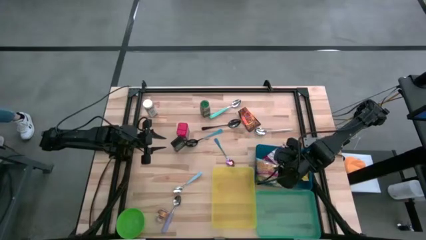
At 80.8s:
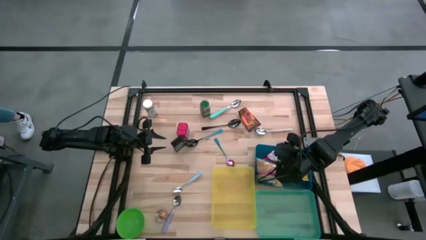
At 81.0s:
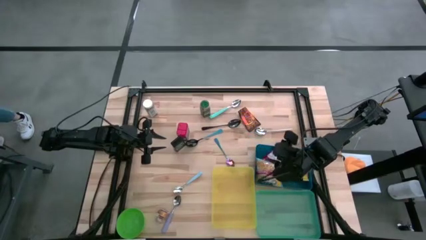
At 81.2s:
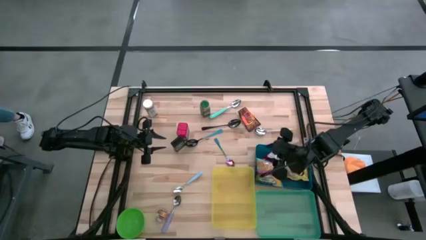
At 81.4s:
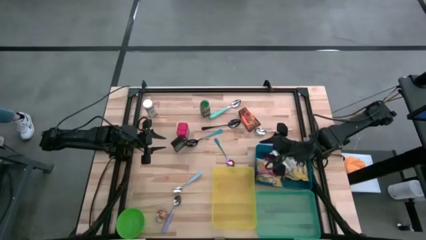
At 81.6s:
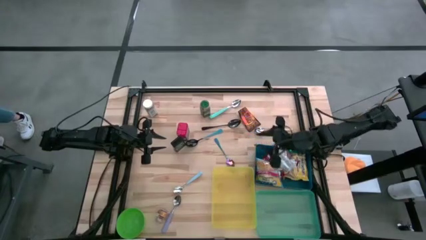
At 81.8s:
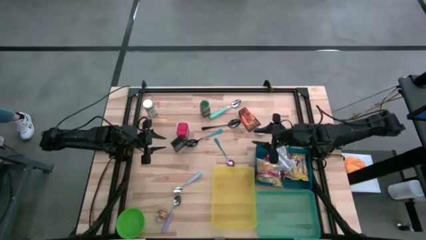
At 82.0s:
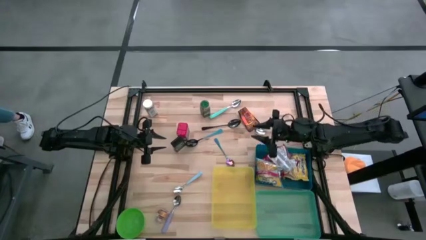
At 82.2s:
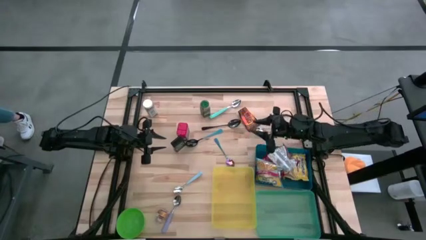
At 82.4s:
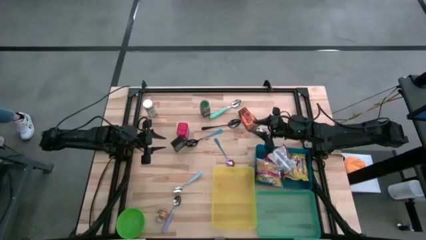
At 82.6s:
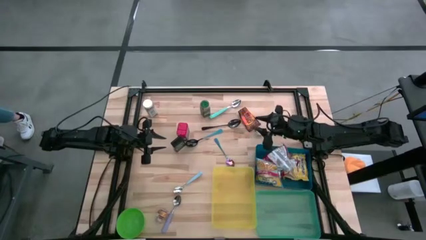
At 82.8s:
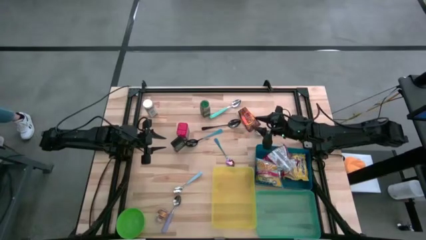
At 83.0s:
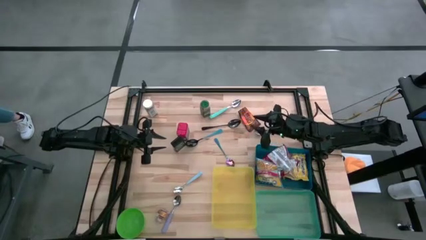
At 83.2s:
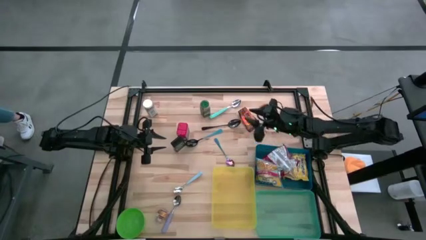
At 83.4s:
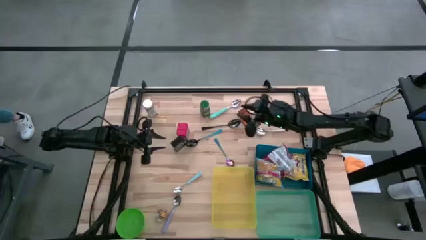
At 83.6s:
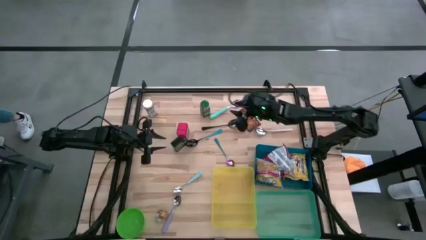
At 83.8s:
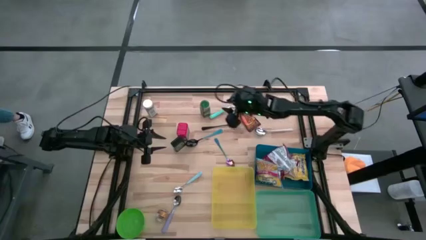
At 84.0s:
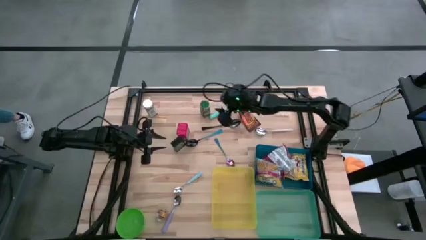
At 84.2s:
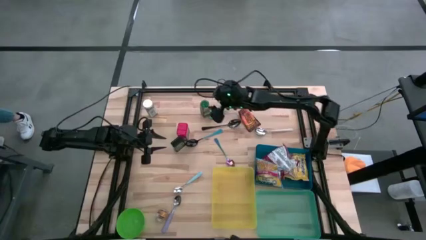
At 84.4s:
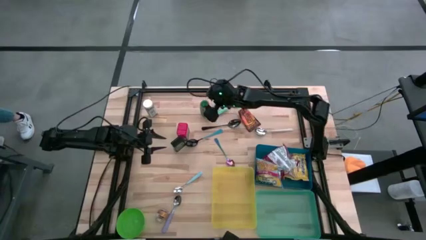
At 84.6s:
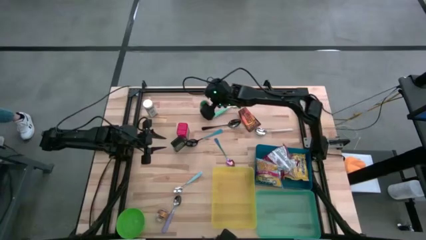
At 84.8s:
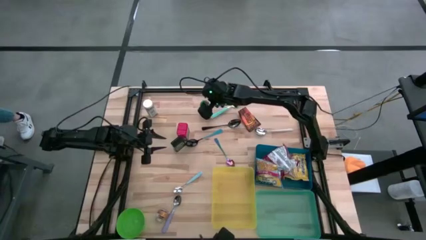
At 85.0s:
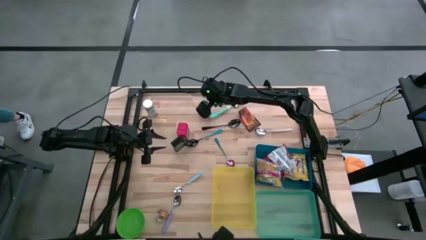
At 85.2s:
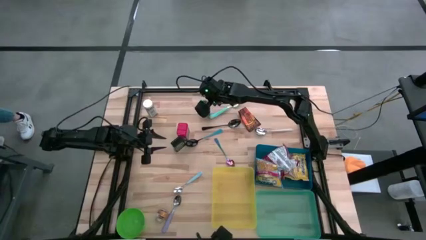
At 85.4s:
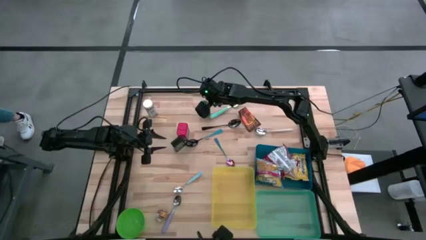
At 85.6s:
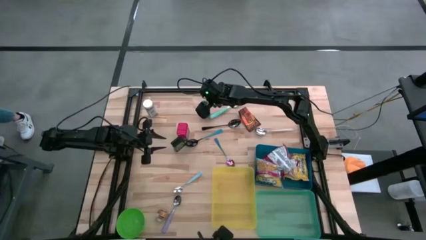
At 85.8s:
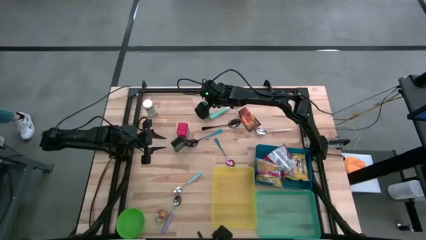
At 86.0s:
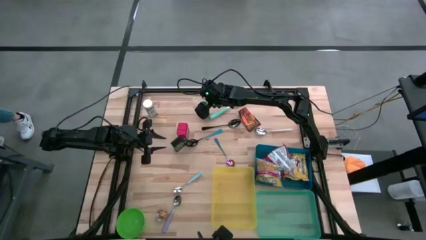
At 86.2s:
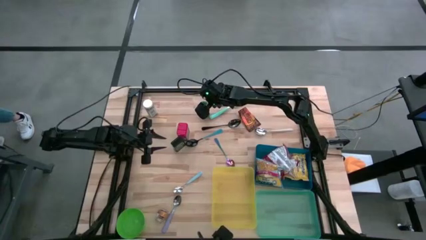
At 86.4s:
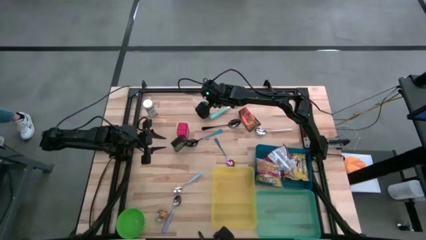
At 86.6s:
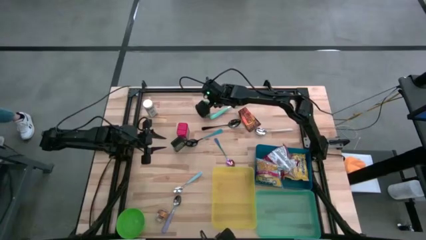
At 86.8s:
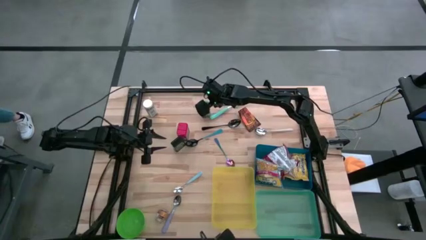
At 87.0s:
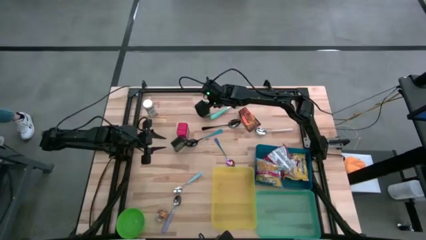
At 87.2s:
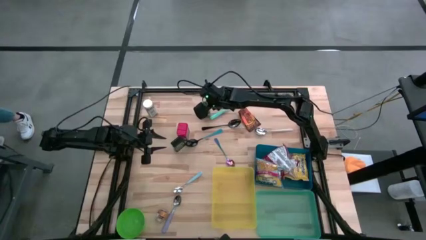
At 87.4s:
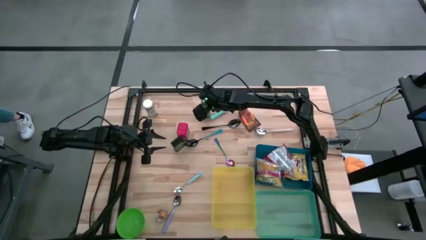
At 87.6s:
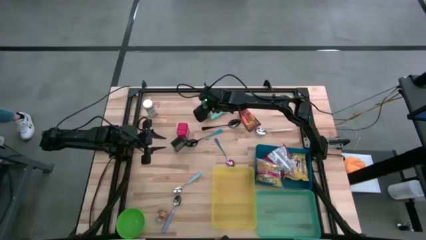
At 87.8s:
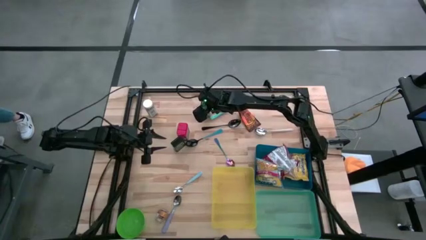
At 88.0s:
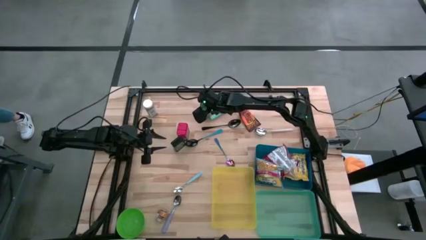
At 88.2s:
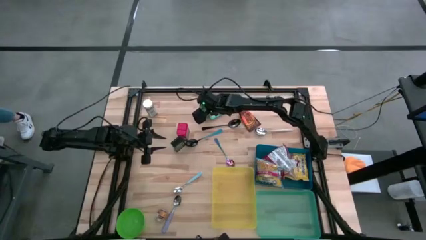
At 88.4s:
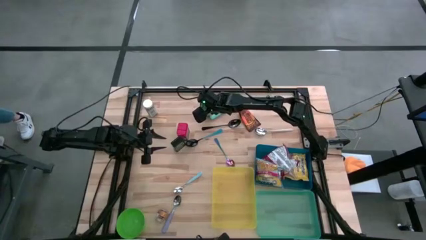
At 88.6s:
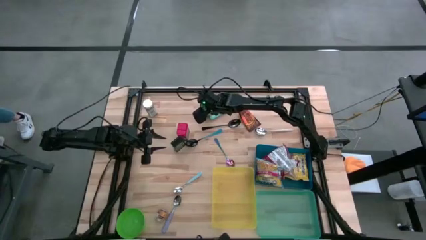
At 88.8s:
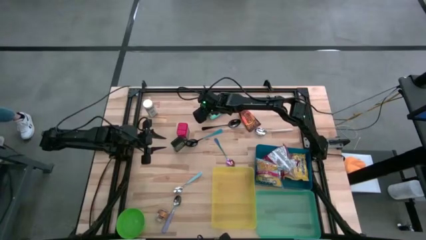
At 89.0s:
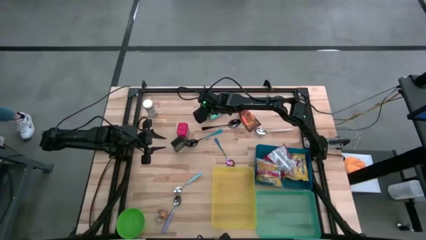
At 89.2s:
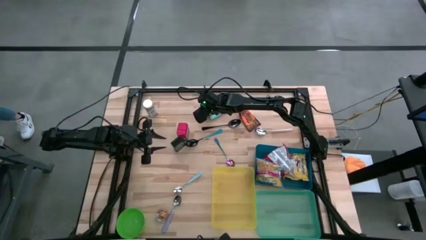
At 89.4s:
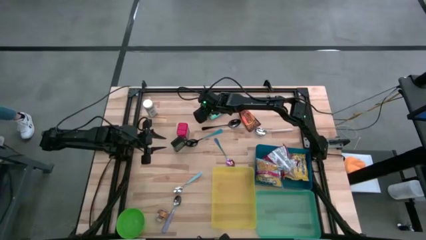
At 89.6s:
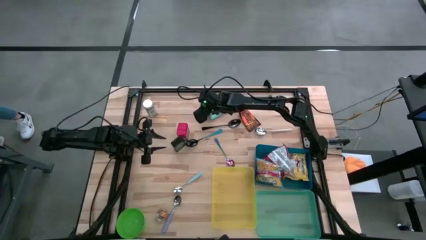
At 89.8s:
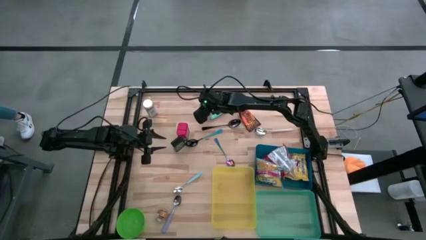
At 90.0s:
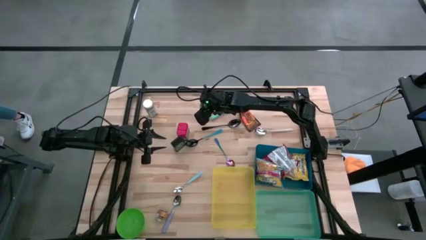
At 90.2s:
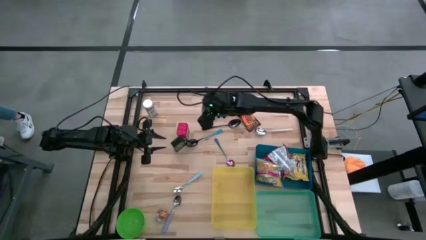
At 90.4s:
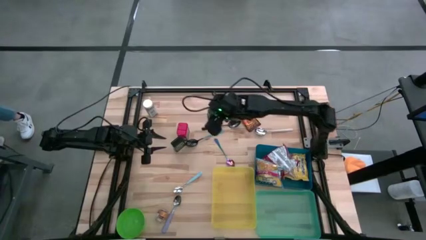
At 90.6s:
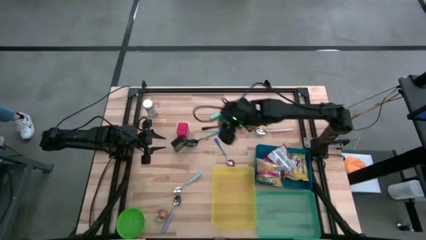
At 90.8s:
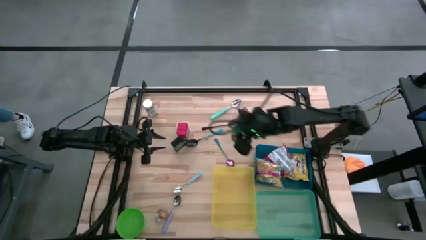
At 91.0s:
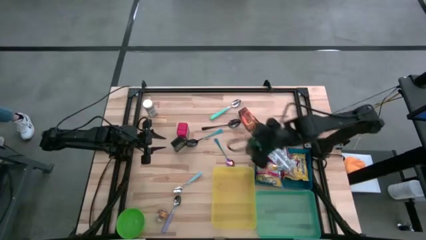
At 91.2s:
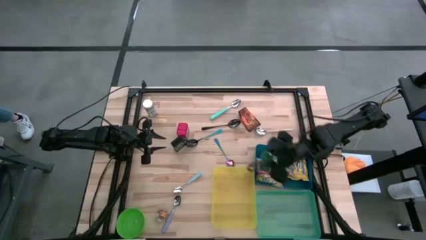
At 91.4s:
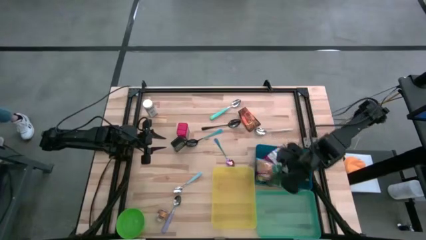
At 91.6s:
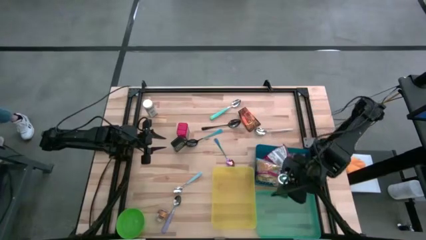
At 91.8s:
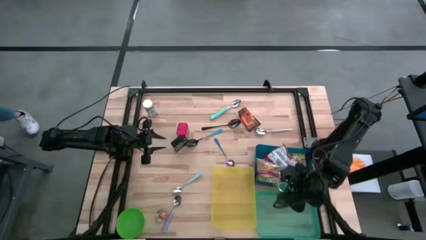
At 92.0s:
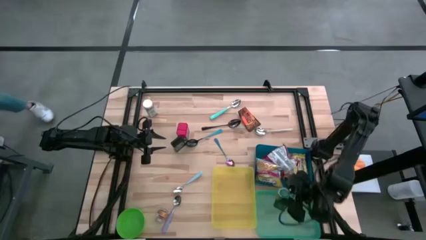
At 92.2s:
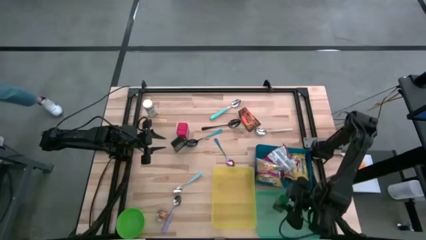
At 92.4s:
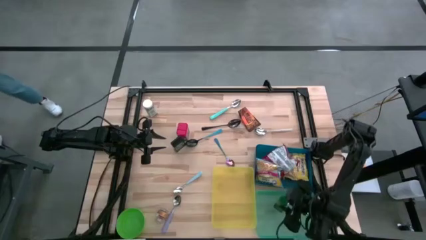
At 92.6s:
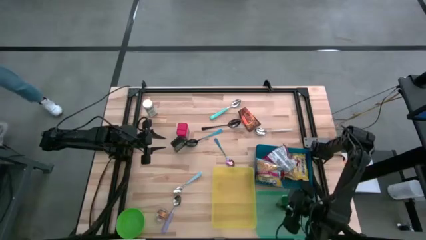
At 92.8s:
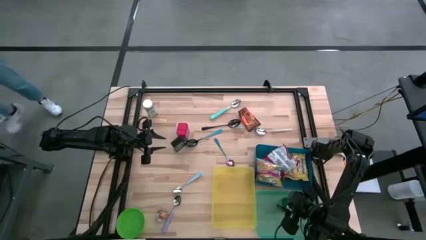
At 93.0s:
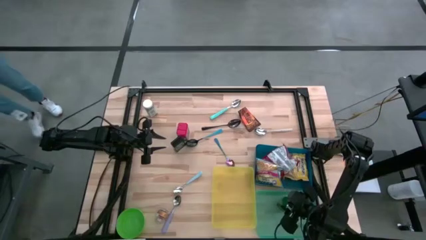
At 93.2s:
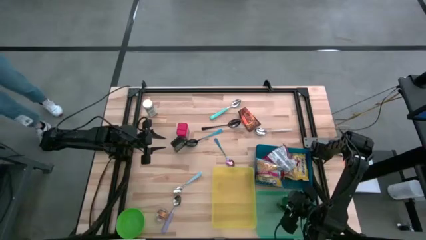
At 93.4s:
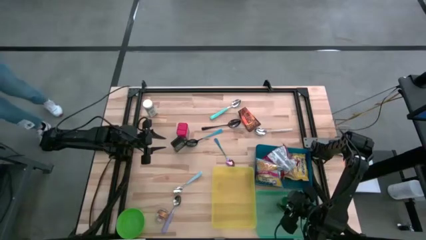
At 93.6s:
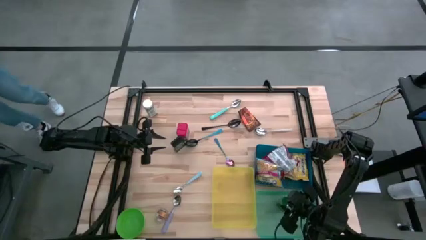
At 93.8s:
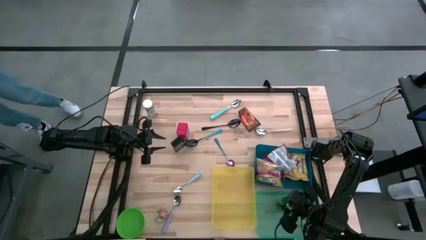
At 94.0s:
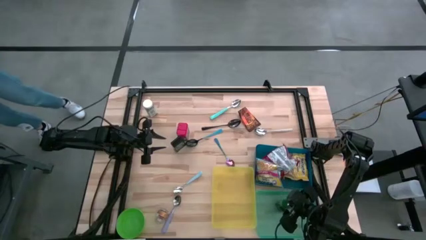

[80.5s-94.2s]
Put the green seasoning jar into the green bin

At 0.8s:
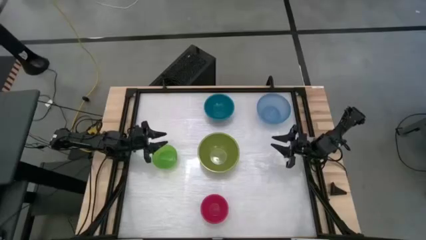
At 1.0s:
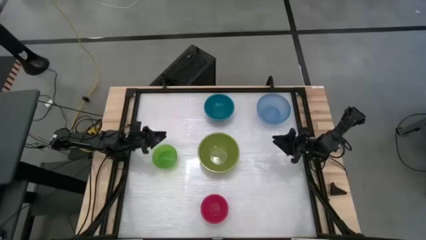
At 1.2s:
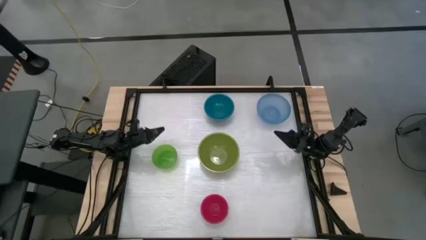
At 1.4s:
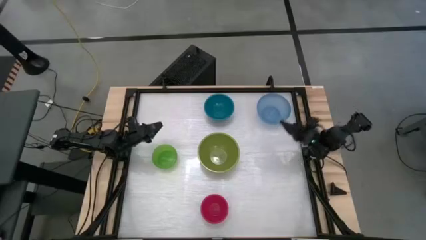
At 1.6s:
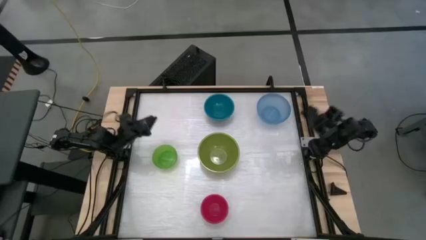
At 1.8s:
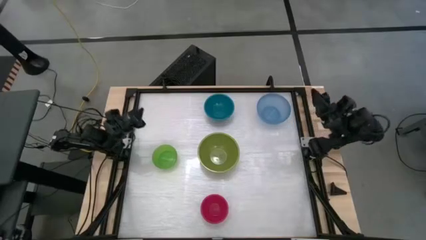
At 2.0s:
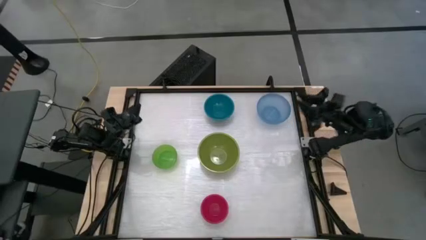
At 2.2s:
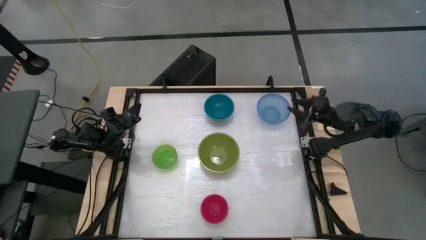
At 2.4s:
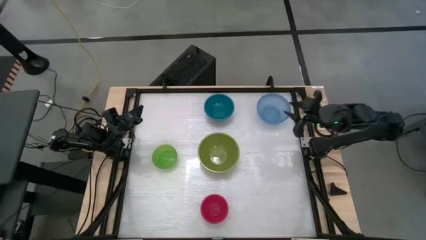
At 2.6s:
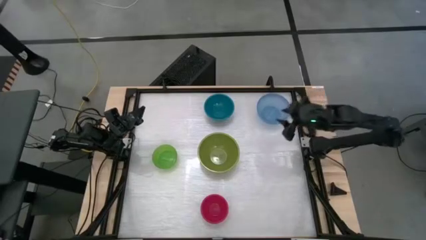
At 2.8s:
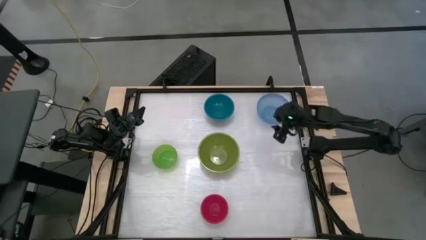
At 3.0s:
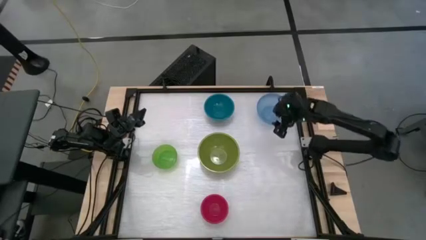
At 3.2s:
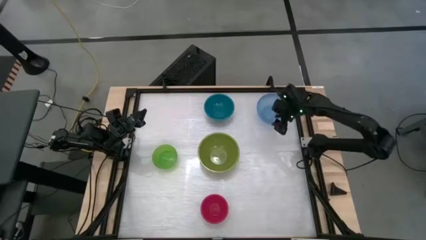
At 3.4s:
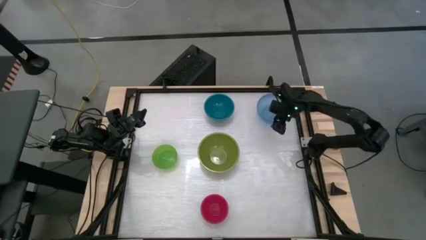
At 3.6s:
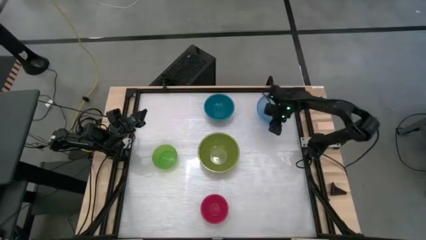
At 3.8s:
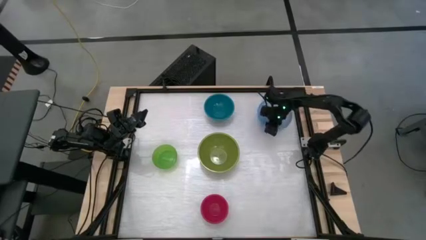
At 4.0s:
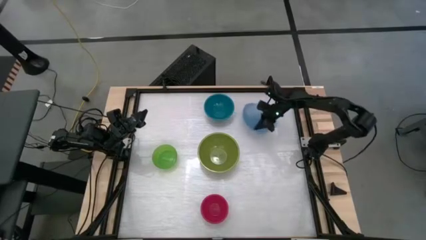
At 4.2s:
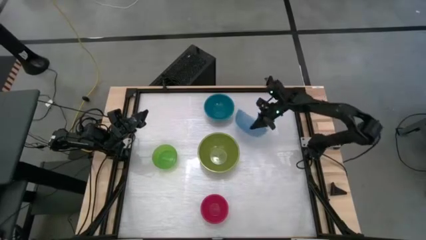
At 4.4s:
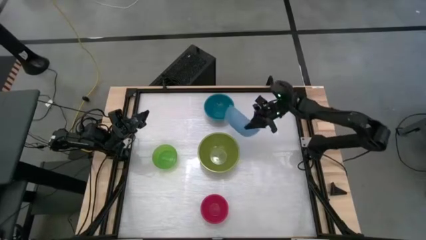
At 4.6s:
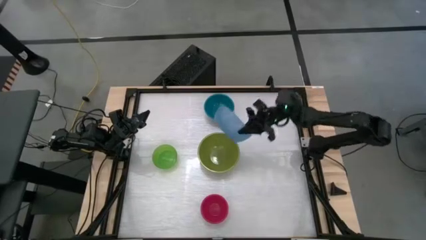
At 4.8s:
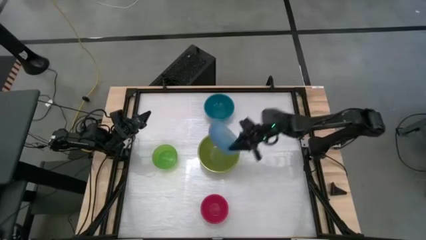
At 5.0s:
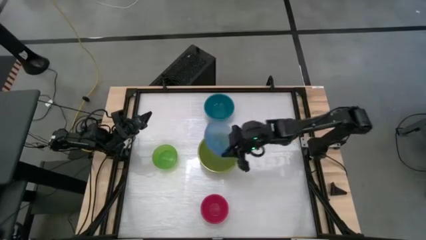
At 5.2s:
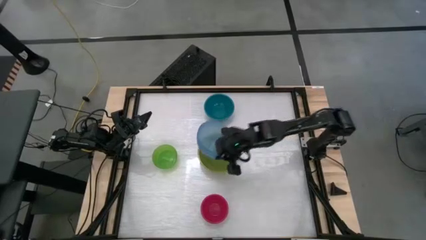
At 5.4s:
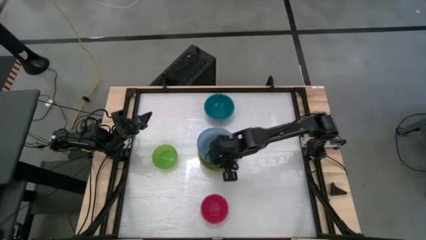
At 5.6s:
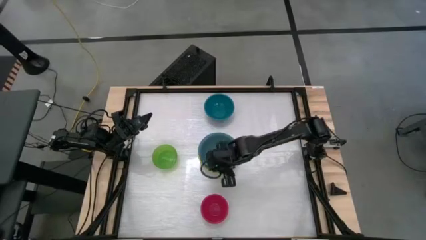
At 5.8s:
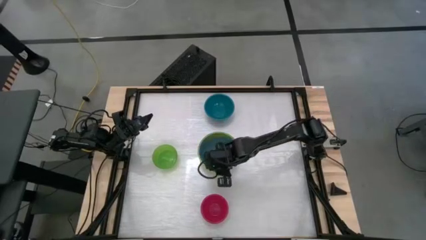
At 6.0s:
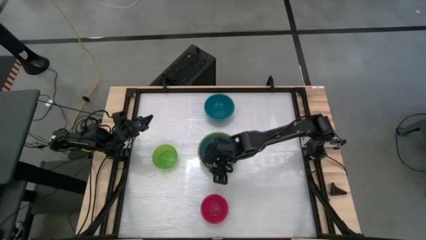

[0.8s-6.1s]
Stack the blue transparent bowl on the green bowl
